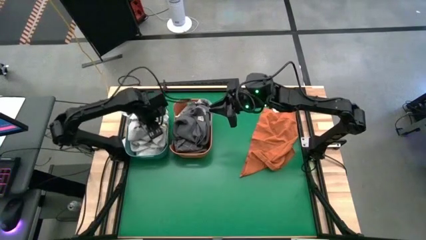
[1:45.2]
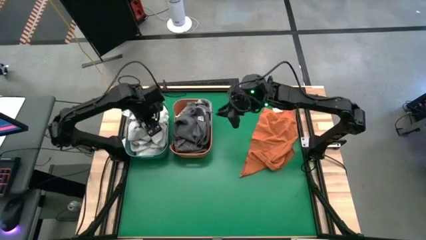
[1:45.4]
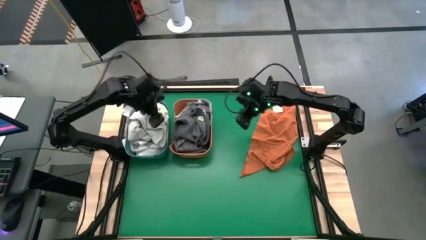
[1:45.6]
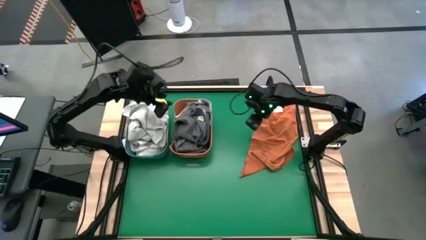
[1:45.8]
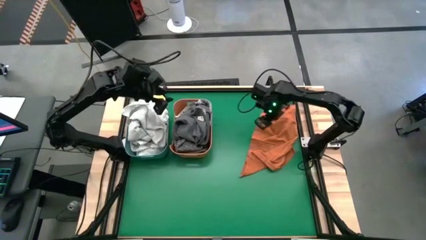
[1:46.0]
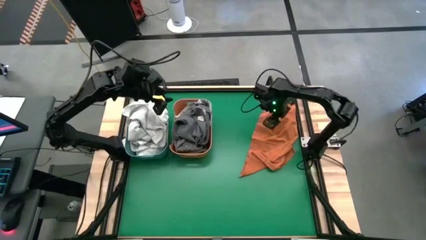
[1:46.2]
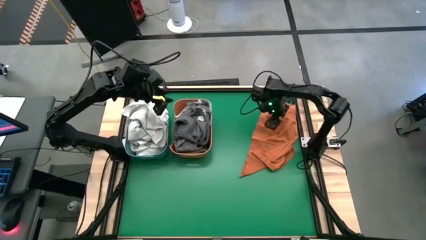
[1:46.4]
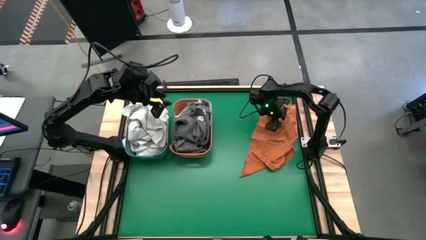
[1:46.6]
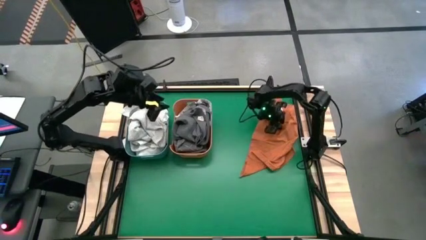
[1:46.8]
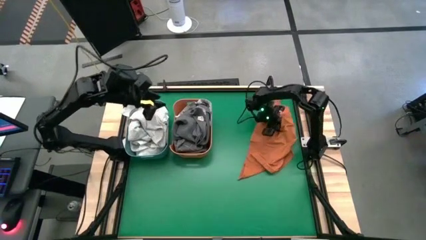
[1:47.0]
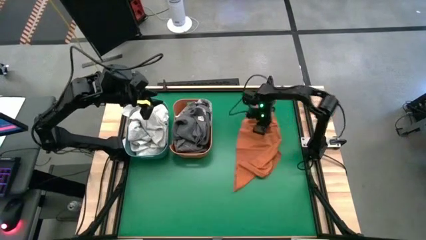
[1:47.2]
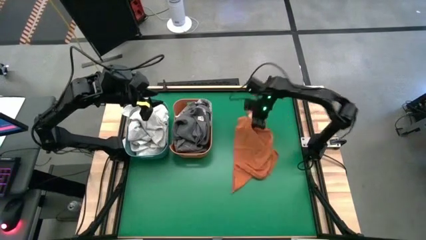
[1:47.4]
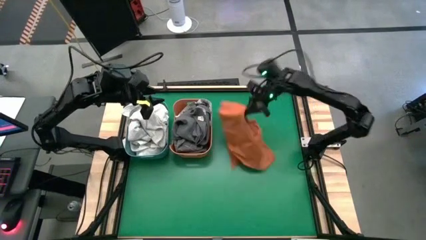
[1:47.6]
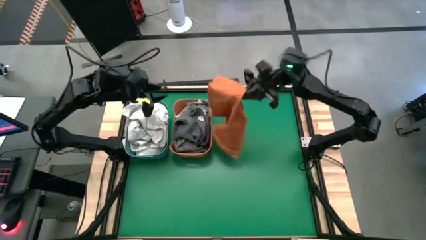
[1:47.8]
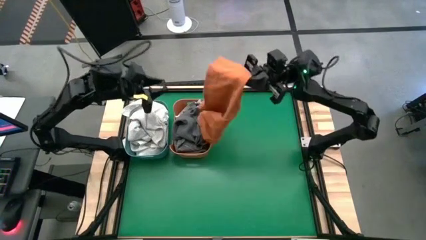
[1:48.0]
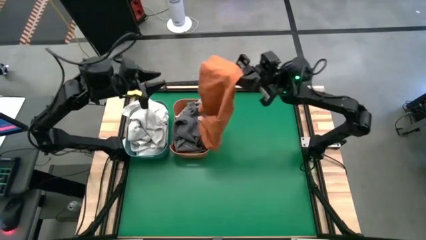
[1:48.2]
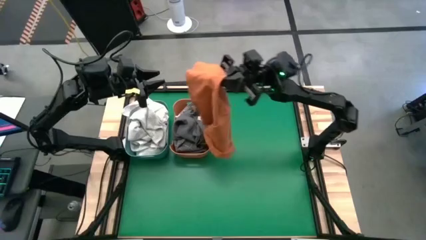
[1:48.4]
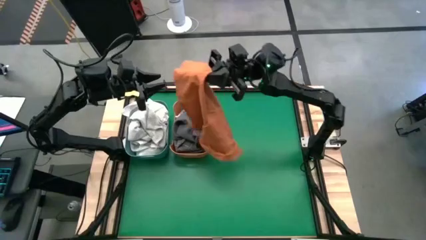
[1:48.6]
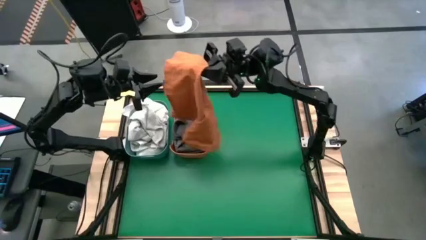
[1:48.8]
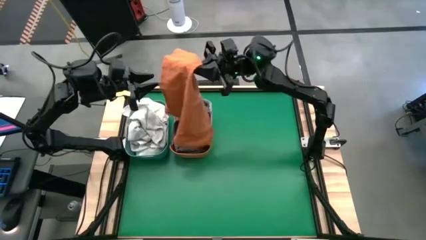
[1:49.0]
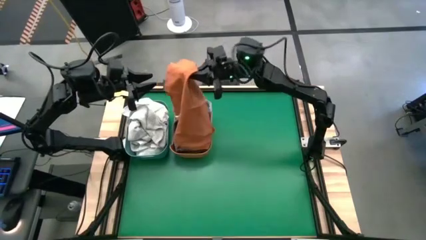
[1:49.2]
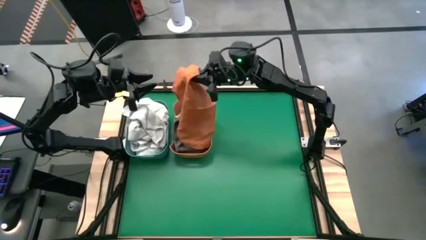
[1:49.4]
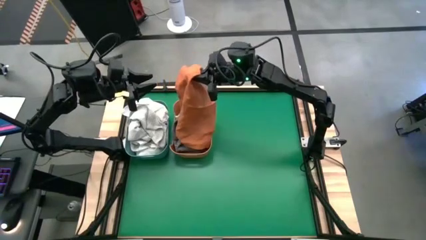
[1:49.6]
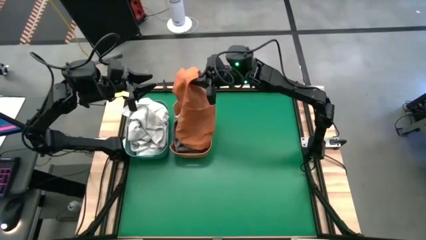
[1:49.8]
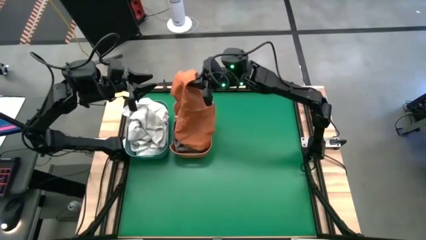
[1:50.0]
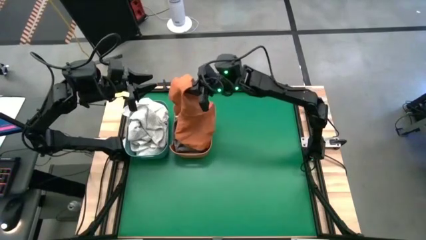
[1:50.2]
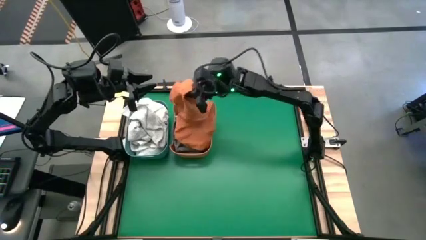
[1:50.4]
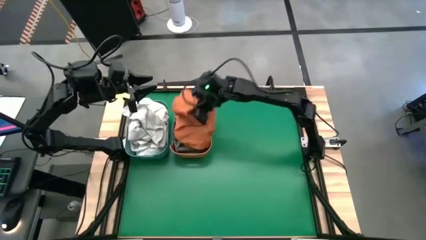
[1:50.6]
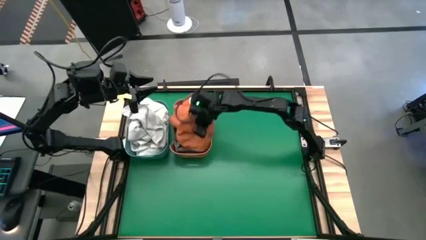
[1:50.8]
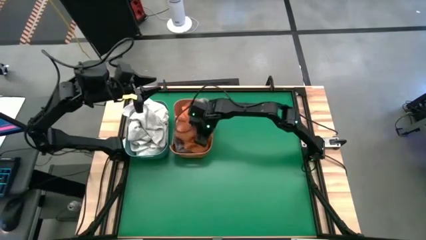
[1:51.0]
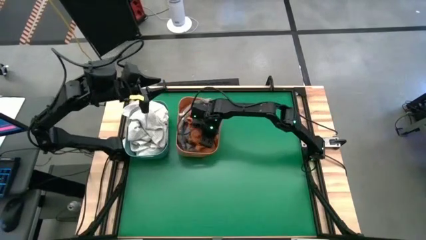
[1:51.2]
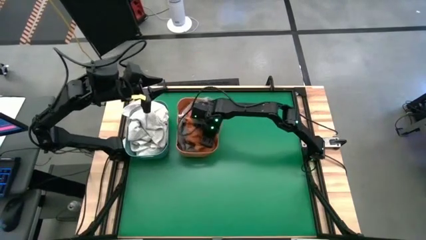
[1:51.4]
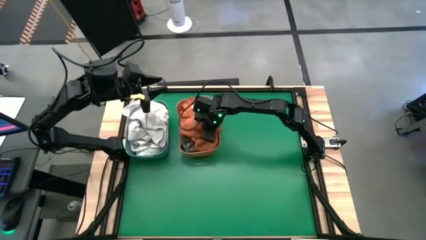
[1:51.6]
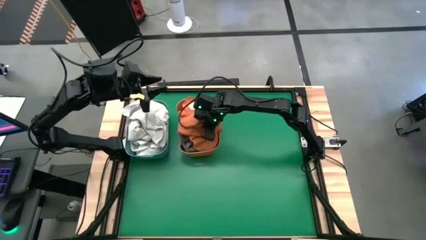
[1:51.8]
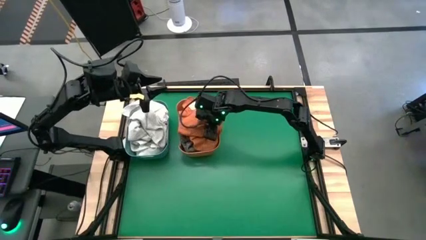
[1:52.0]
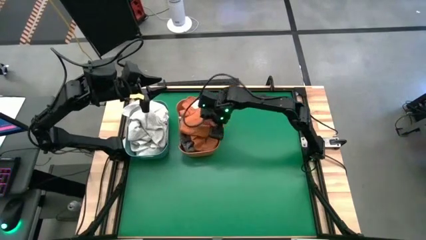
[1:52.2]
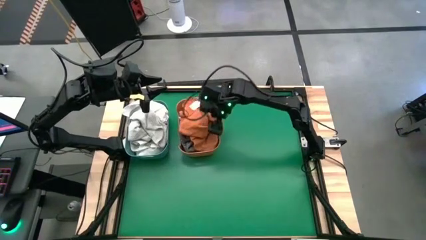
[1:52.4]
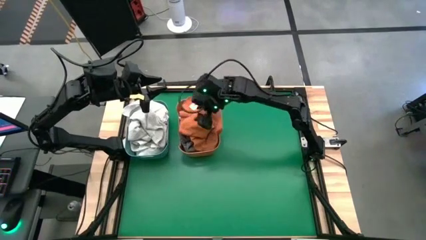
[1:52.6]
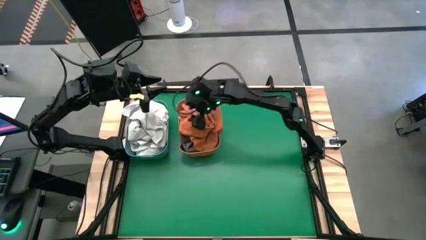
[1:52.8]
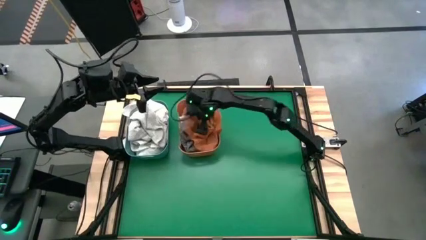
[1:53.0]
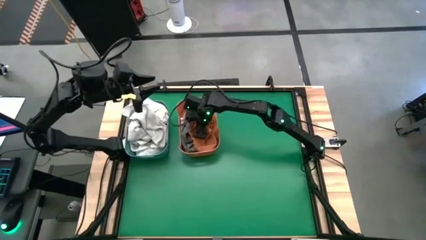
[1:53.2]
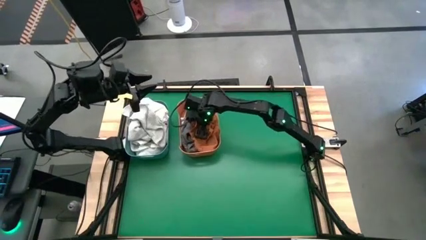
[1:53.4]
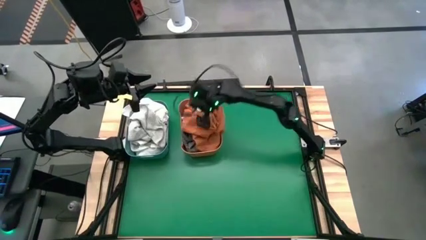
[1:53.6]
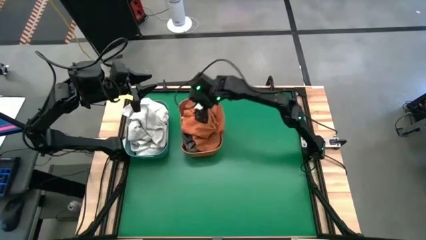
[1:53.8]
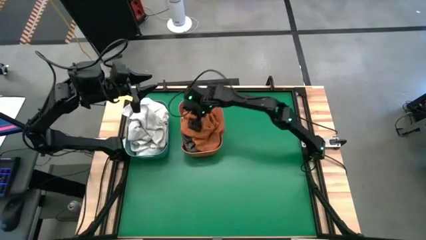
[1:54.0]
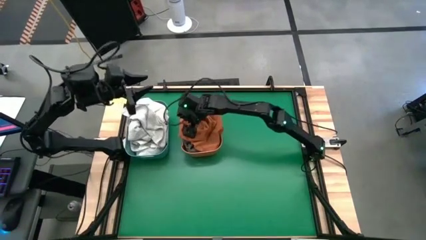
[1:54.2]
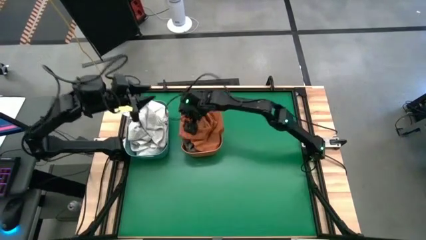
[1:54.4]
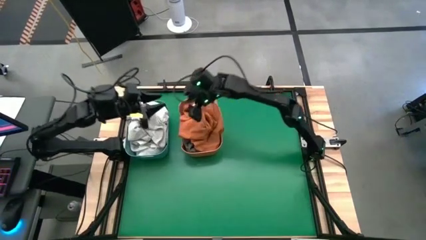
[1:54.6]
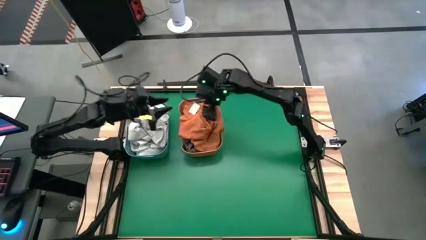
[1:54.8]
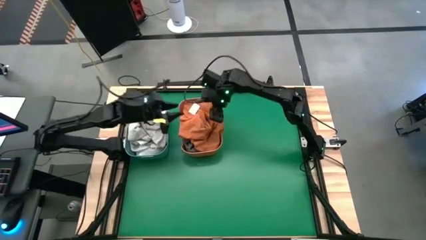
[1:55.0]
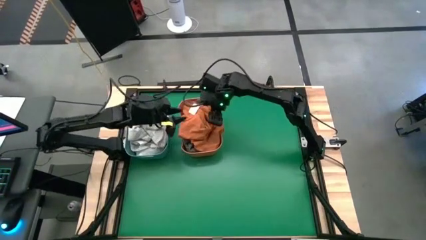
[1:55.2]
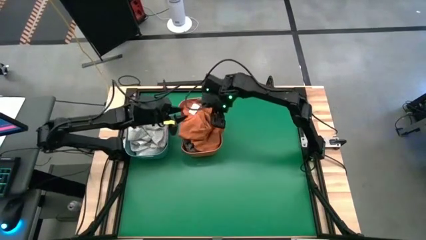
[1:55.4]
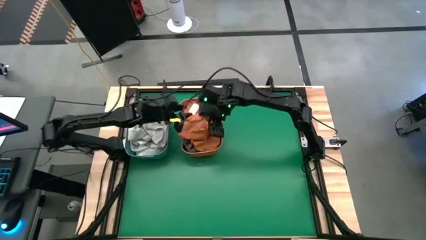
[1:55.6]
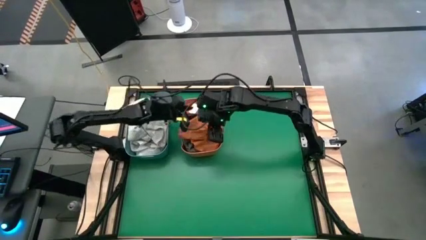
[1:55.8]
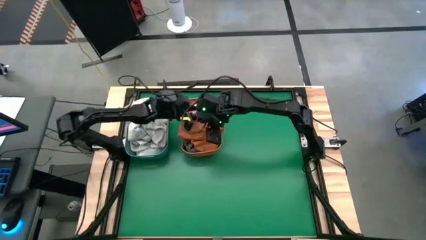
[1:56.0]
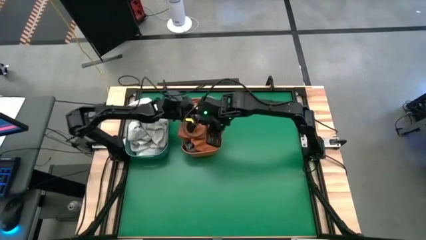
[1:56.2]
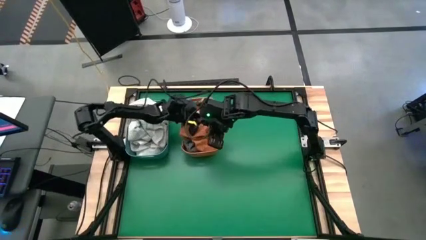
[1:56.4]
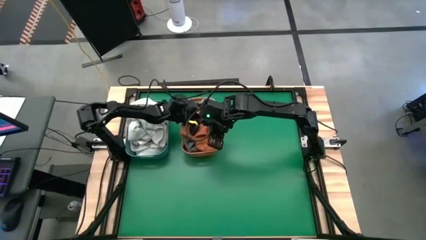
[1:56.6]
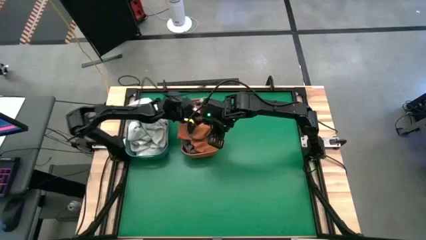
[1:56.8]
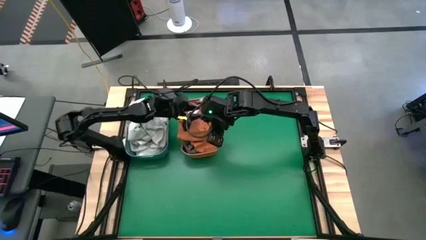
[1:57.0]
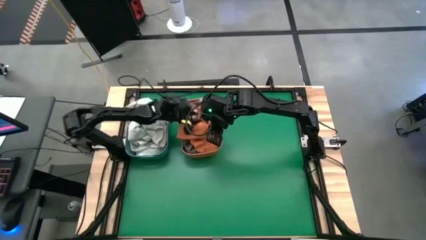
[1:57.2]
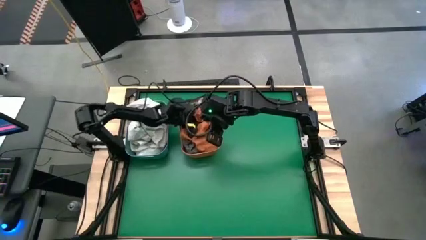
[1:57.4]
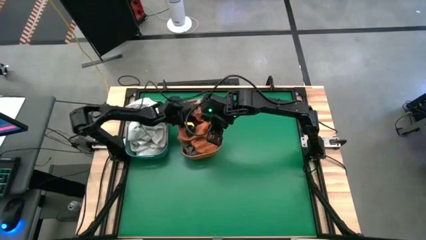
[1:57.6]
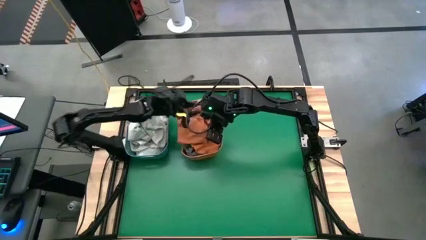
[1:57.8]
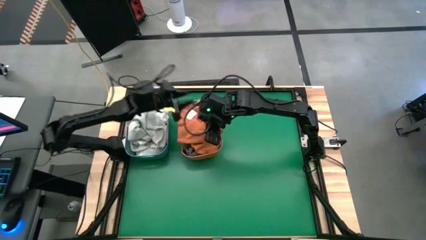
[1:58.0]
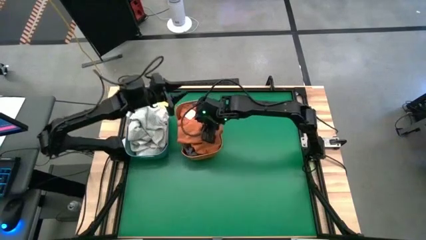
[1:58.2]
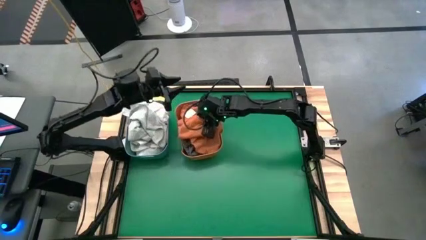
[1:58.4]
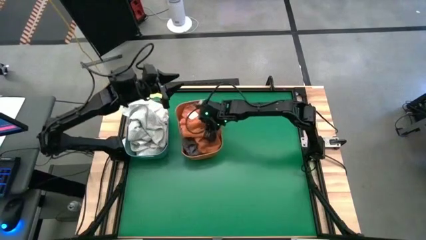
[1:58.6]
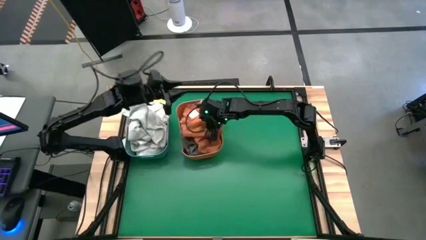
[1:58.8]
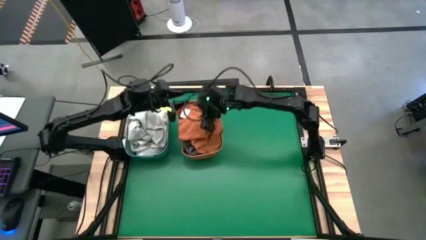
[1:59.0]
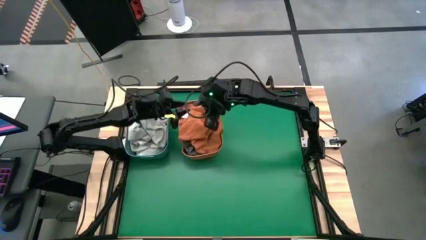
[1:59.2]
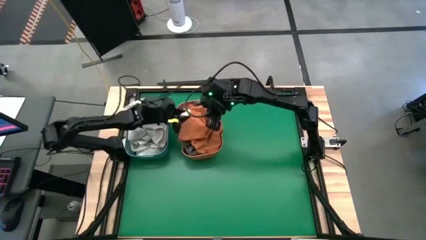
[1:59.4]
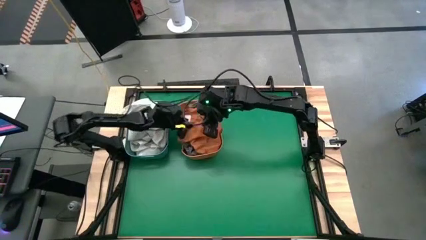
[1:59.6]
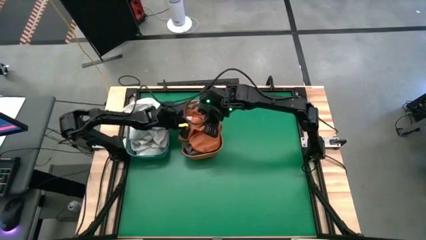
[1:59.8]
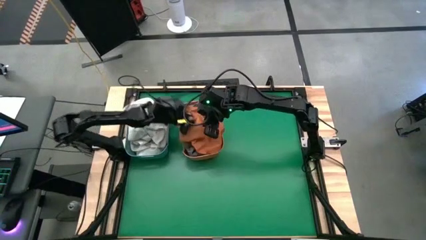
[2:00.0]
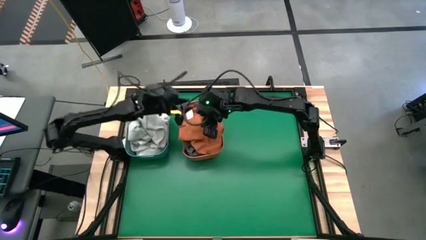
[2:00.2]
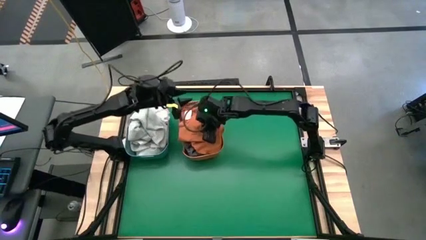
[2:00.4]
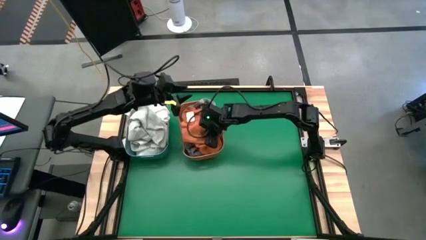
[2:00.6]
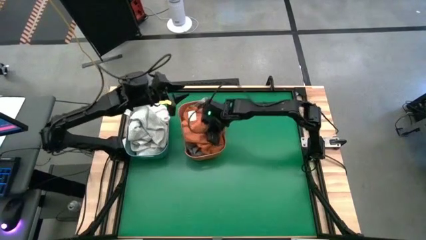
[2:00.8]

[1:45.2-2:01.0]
Task: Sort towels by color in basket
Put the orange towel into the orange bin

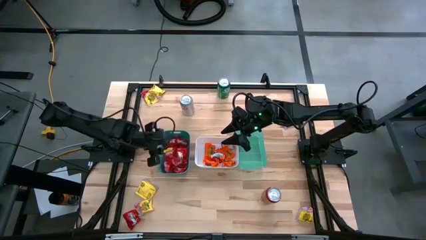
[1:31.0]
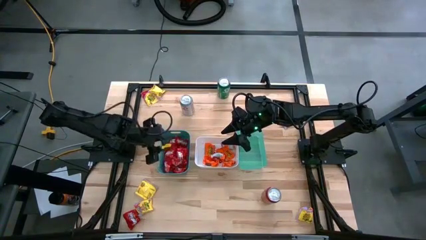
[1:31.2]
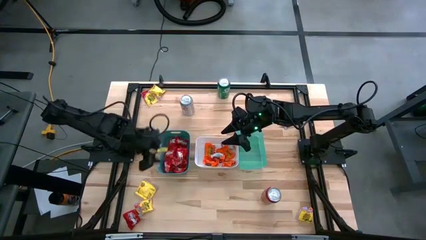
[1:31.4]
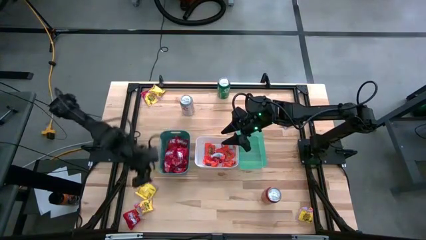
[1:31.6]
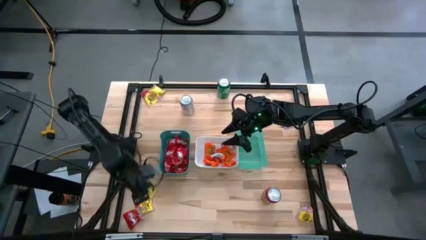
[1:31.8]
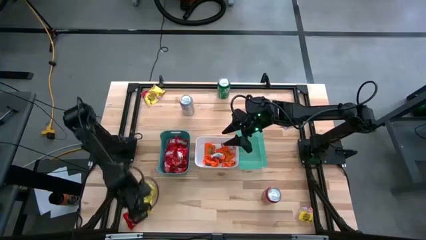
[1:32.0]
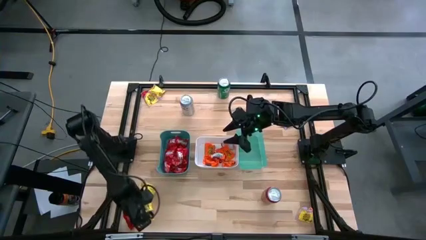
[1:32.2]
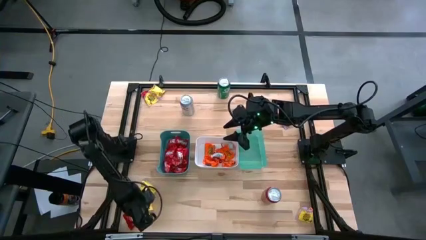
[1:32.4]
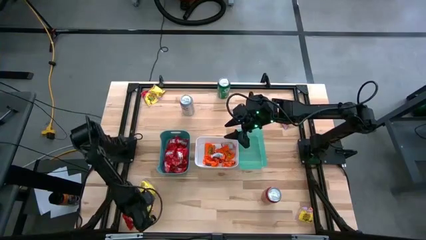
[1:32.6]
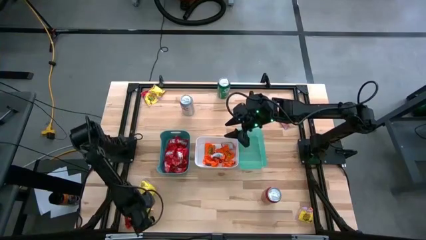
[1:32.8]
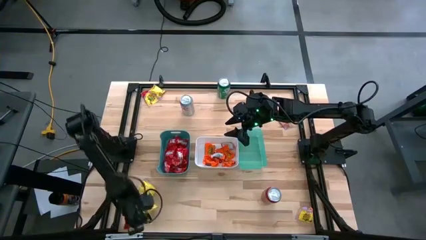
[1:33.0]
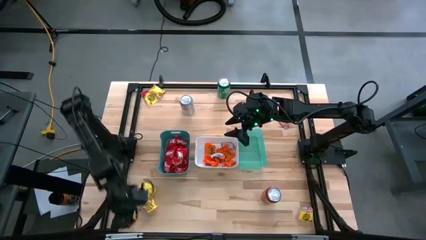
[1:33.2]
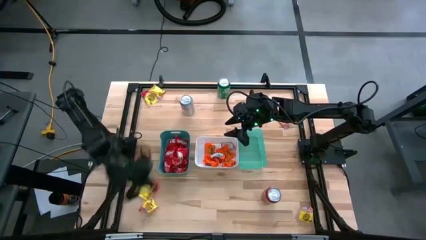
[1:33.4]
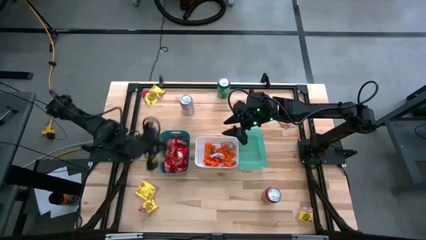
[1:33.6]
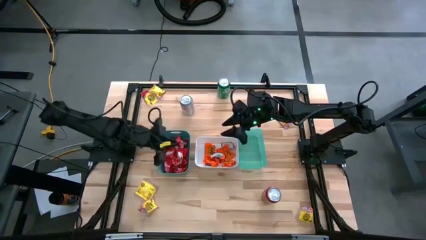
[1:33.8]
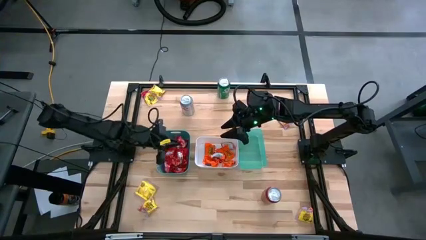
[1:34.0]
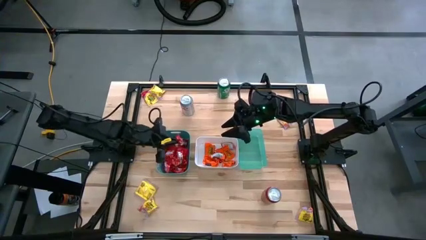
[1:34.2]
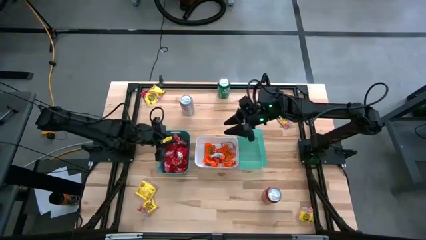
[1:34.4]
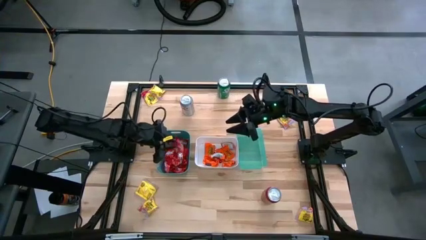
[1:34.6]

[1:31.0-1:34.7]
Task: Sort candy
Put the red candy into the green bin
